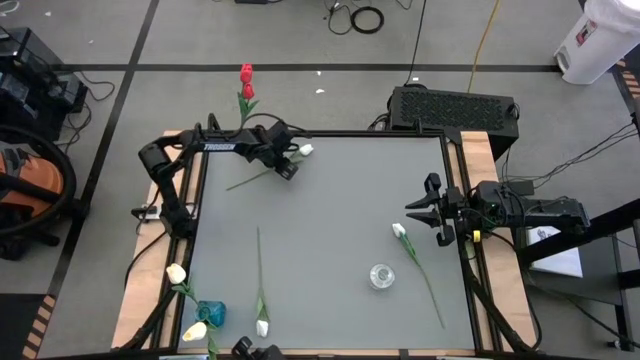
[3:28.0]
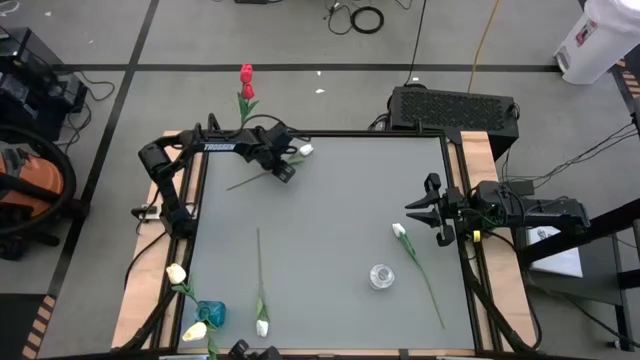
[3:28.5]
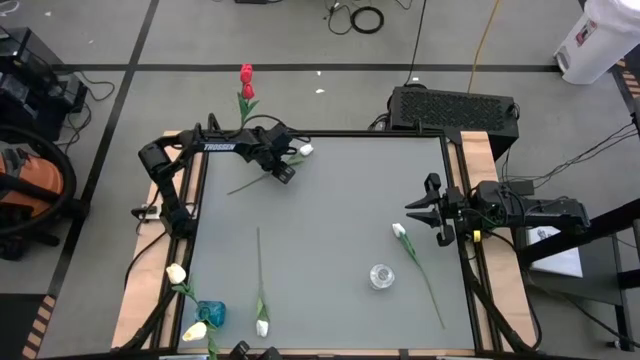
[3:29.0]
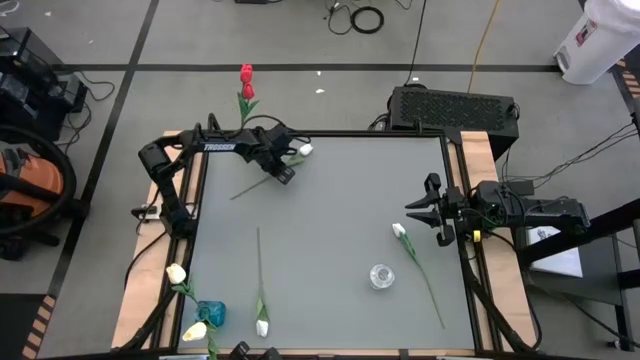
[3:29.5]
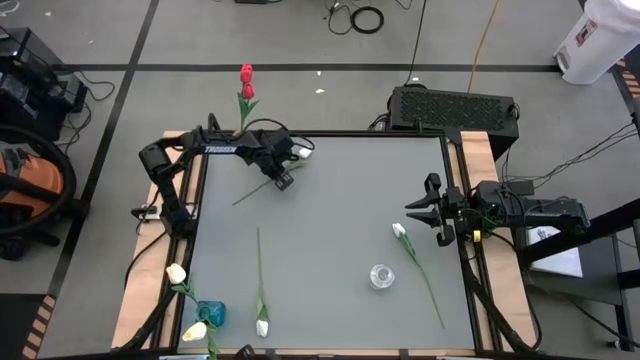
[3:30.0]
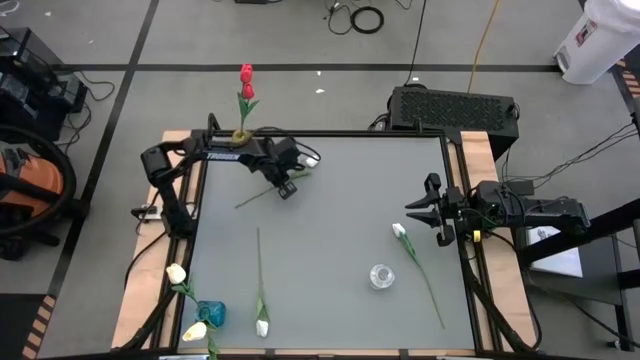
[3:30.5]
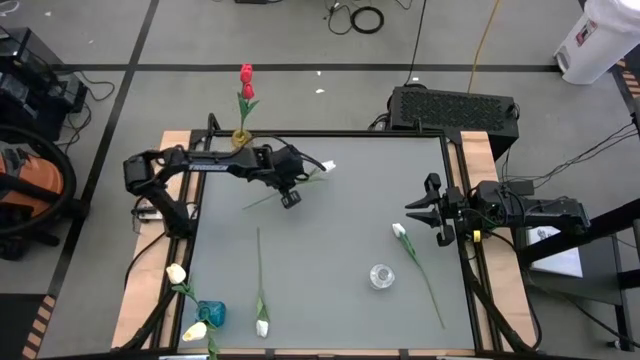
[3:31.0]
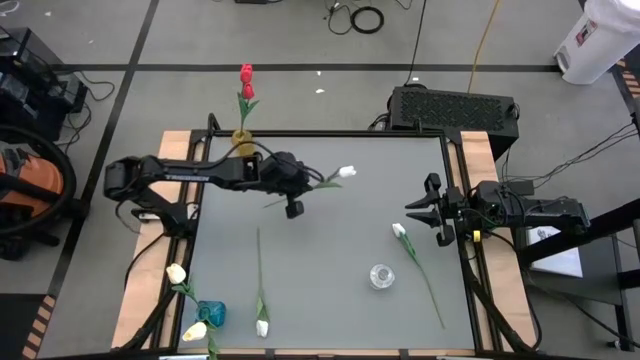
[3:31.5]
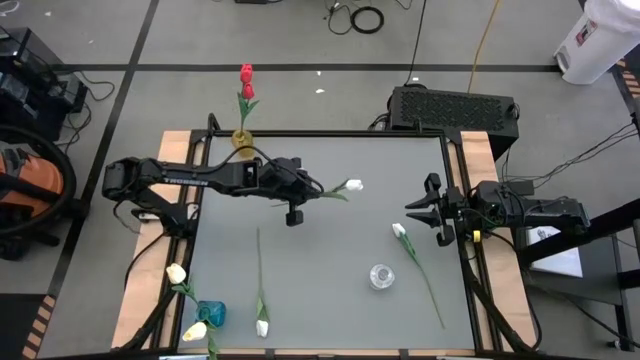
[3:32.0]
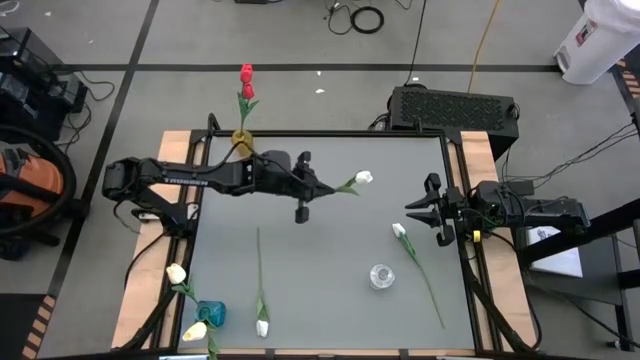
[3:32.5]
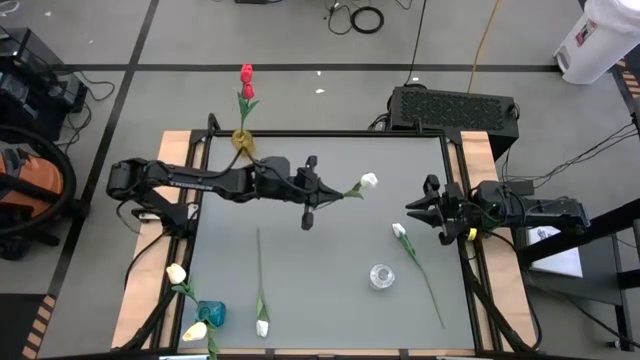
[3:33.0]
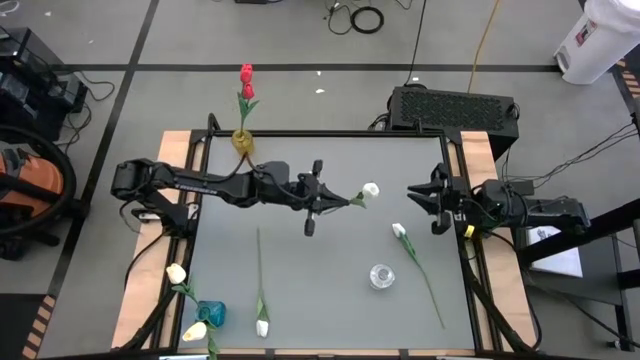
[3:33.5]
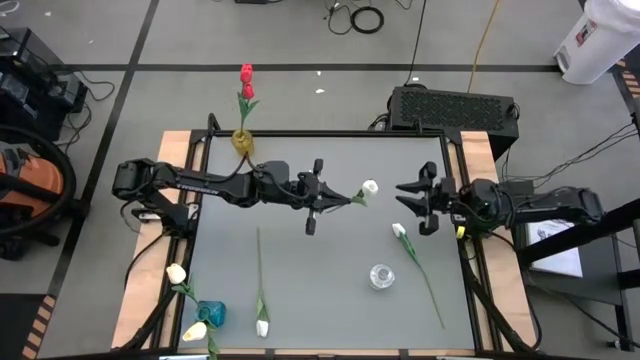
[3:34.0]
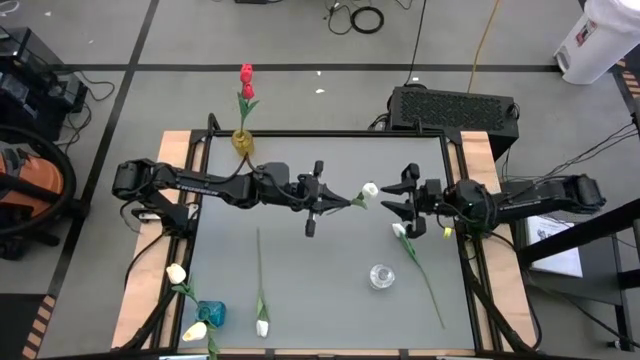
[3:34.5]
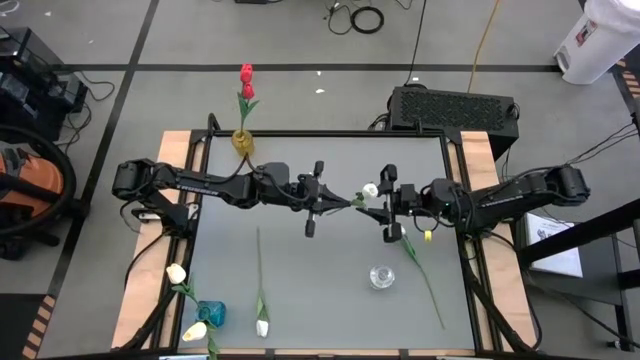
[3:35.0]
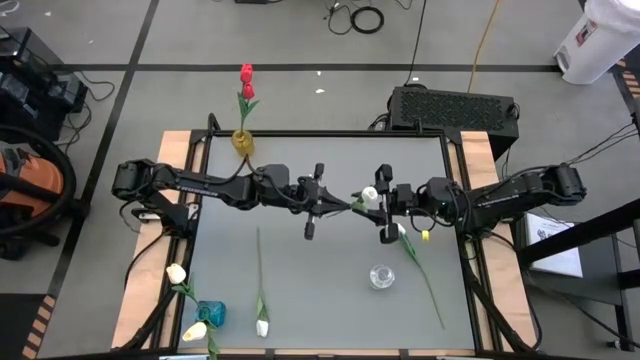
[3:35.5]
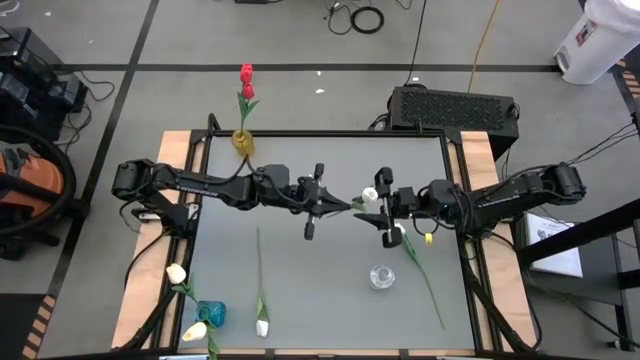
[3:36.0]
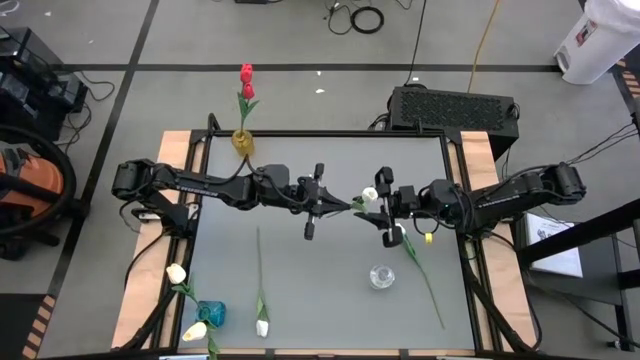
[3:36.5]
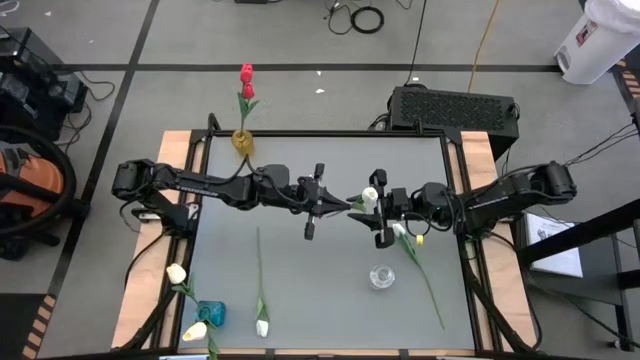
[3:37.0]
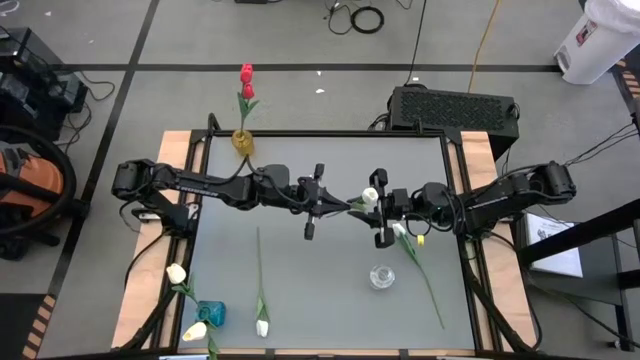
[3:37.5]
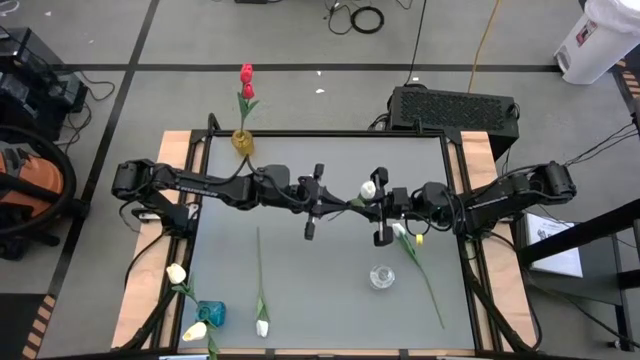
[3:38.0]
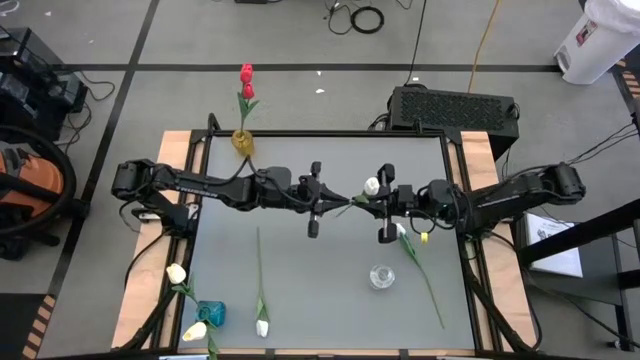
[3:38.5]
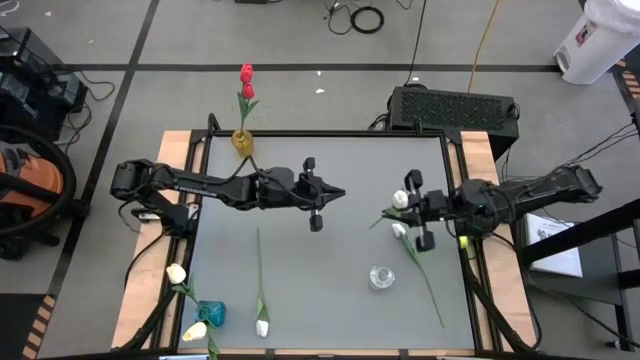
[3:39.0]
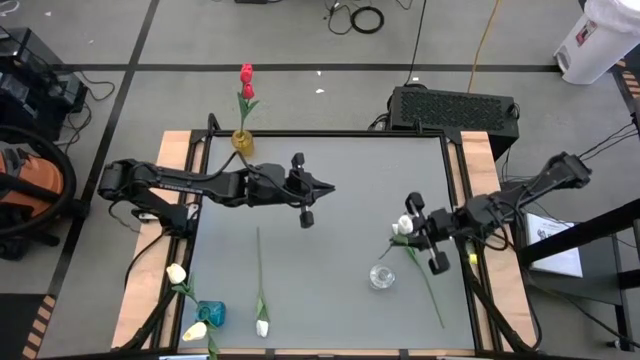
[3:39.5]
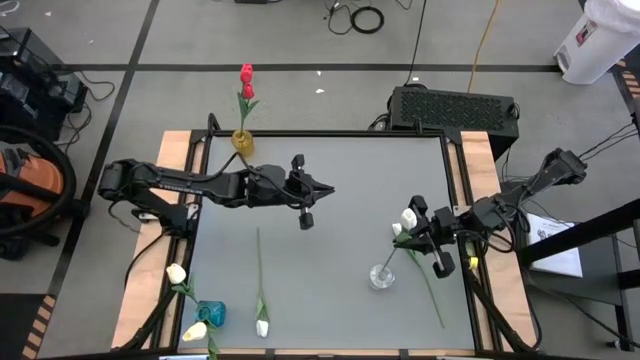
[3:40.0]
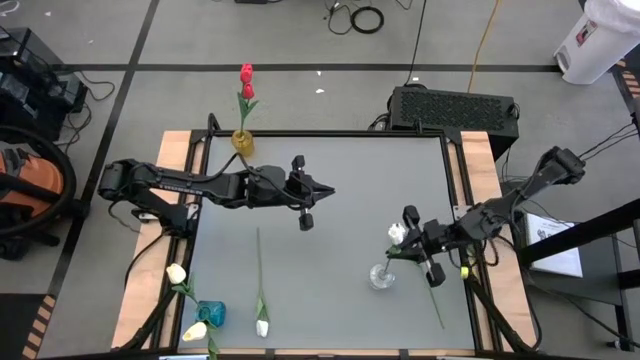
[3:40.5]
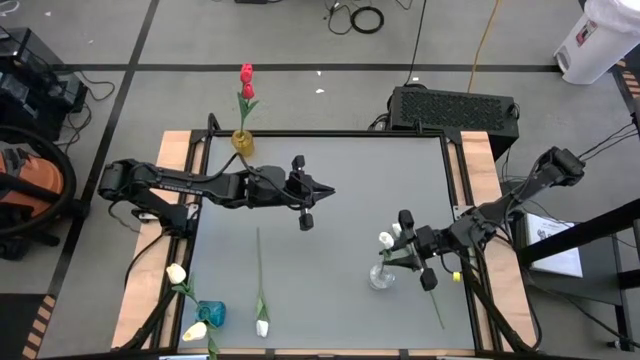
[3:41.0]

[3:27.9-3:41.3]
Task: Sort flowers into vase by color
Put the top white tulip into the transparent vase

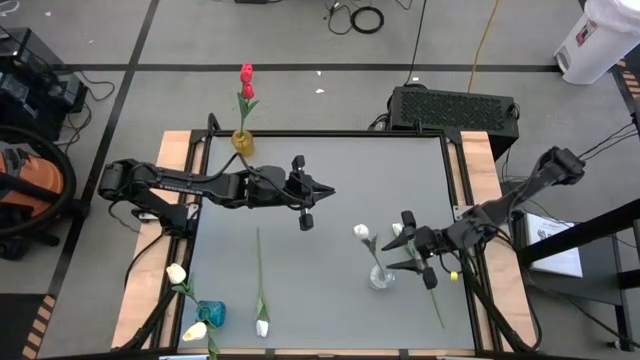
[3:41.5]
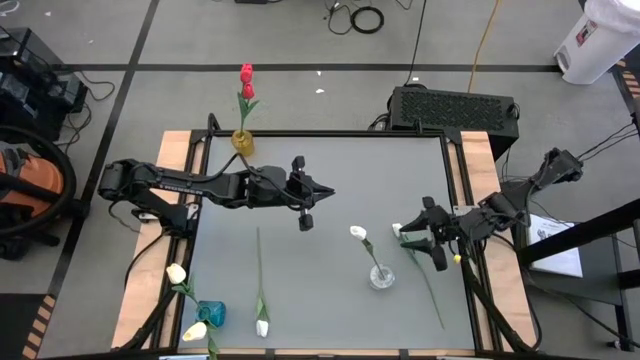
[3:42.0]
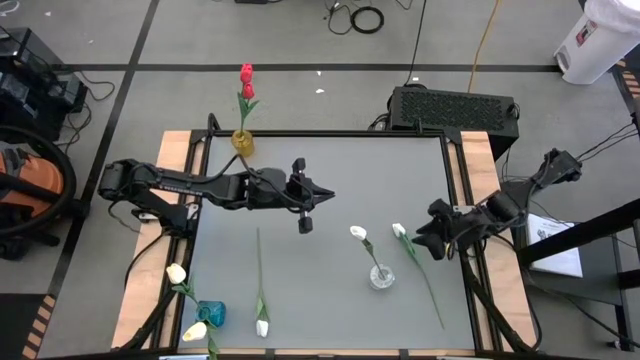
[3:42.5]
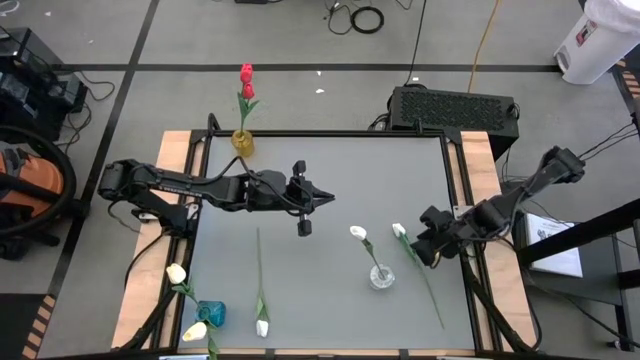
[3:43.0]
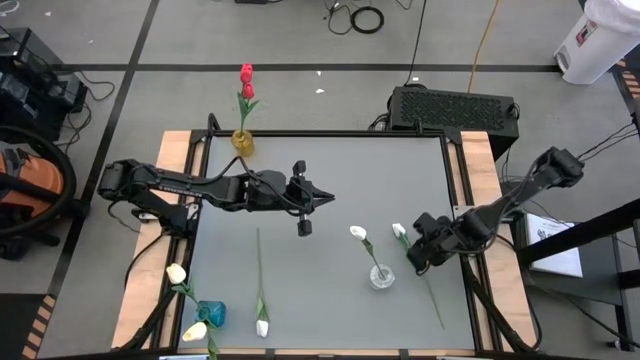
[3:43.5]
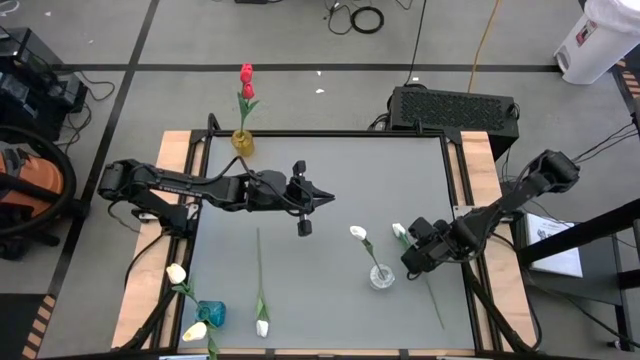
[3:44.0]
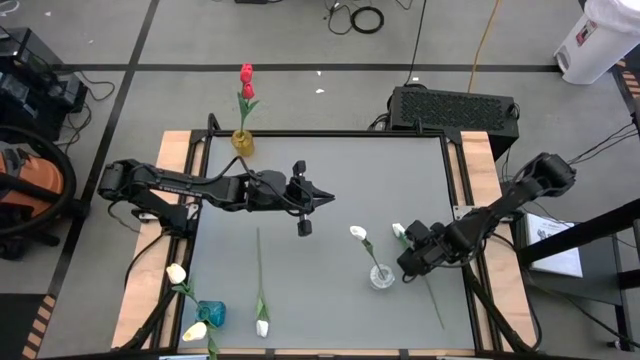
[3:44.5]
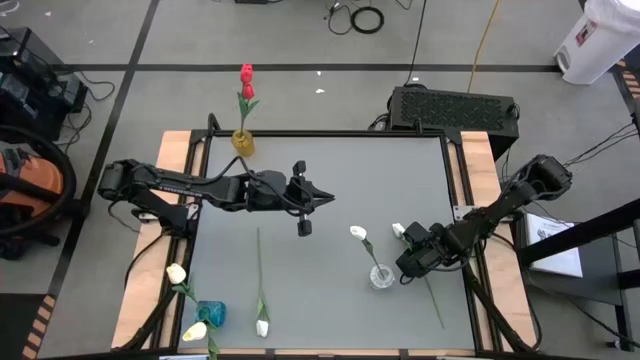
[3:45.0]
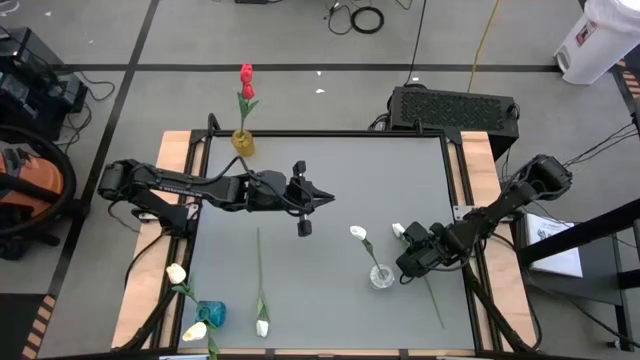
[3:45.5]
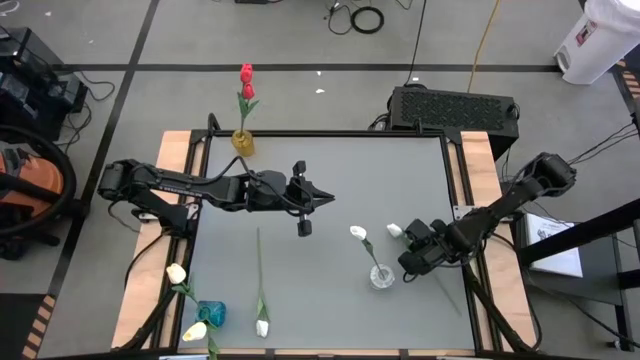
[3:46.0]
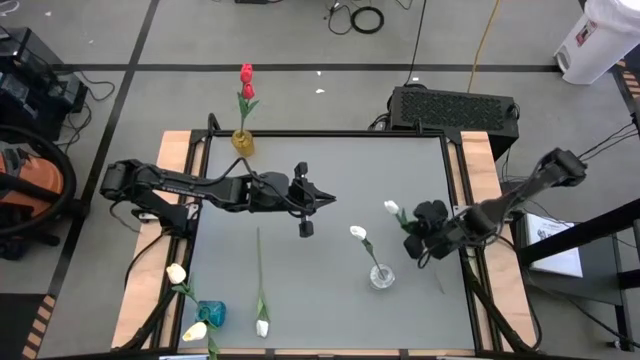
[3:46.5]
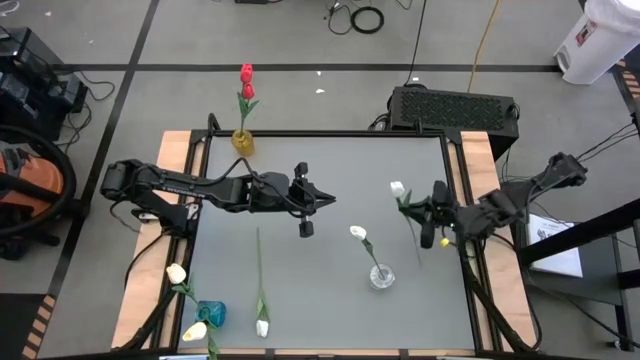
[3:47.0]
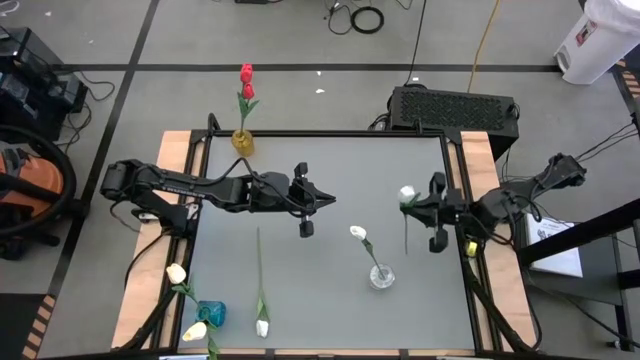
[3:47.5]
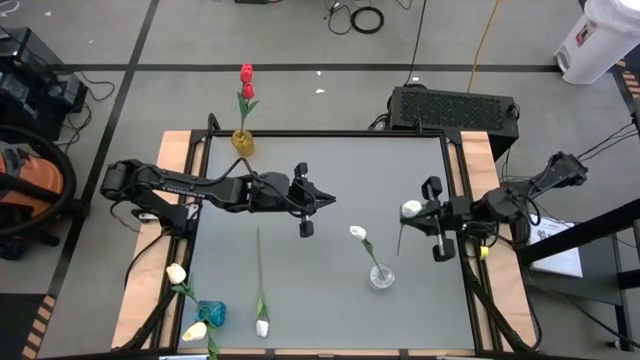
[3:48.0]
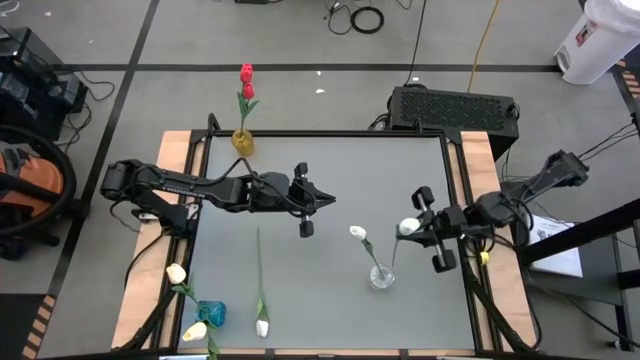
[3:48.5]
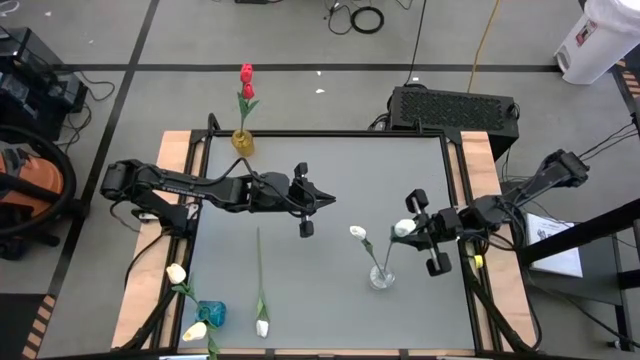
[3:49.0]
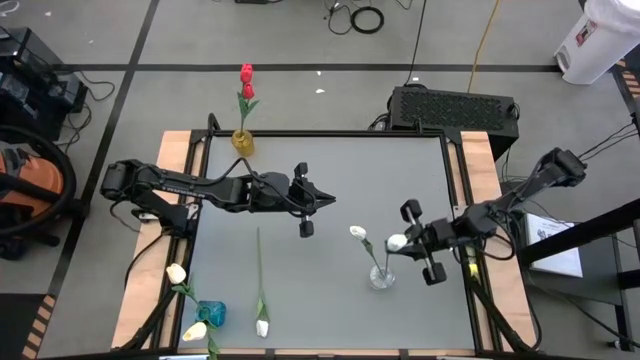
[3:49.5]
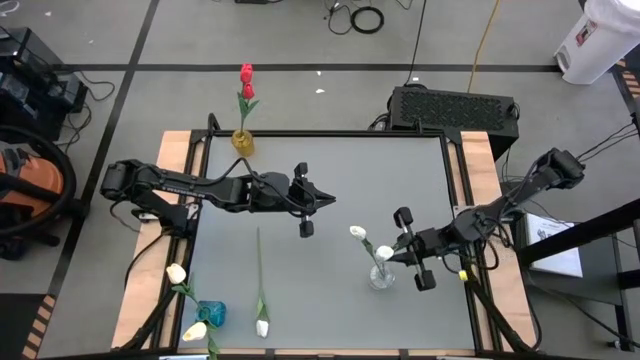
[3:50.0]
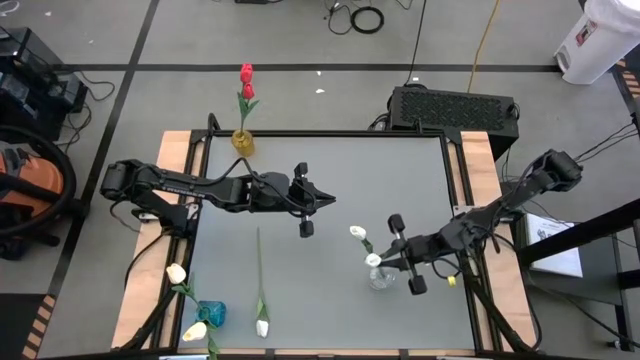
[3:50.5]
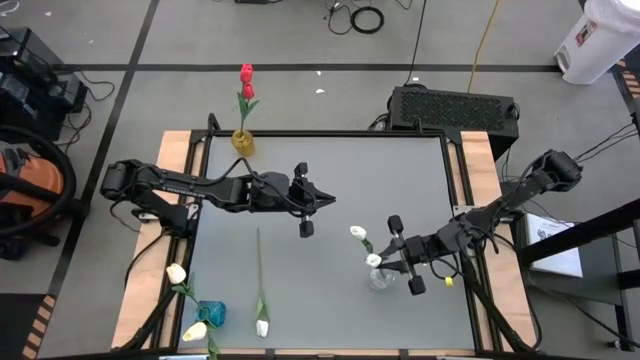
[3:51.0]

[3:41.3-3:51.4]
Put the right white tulip into the transparent vase
